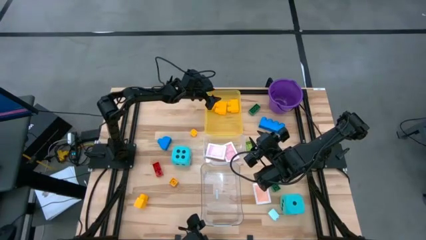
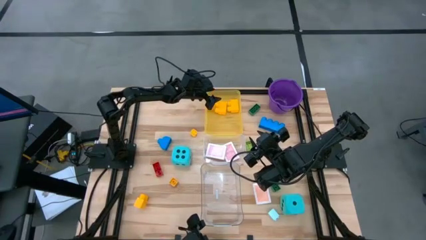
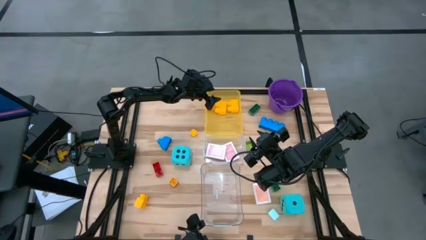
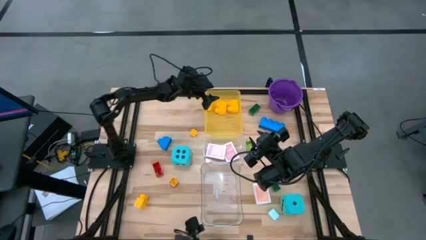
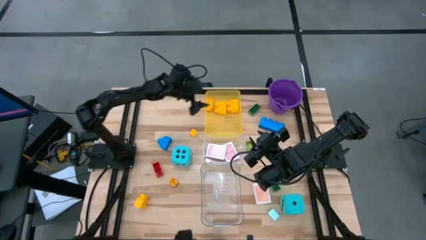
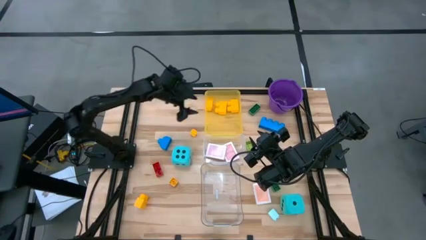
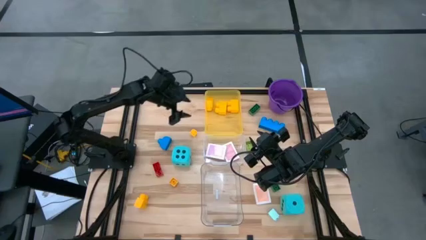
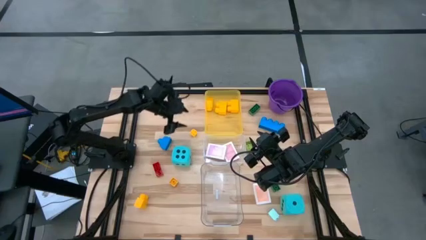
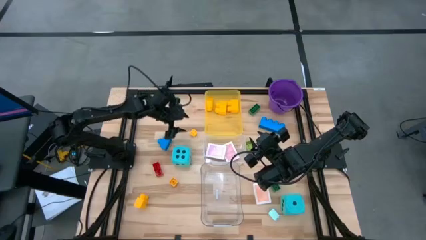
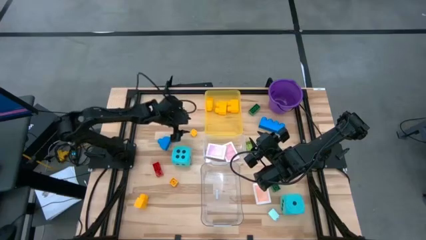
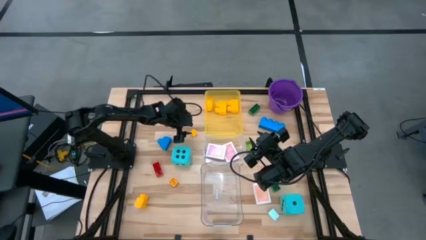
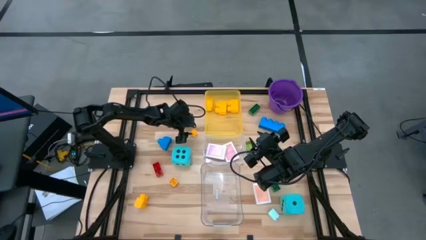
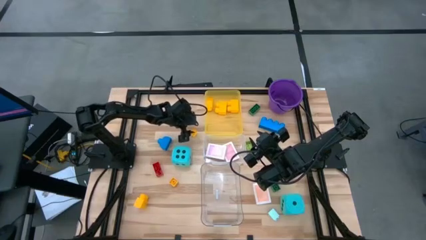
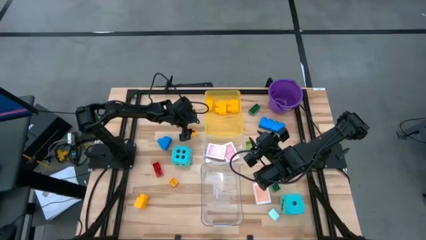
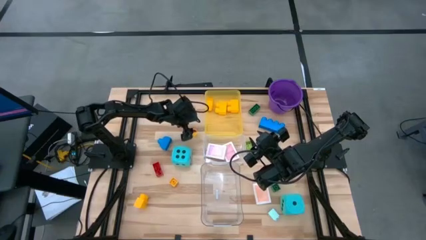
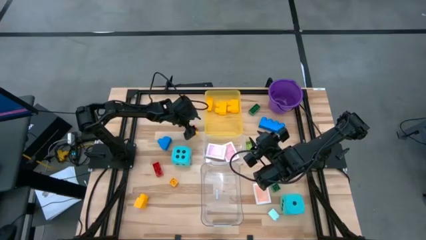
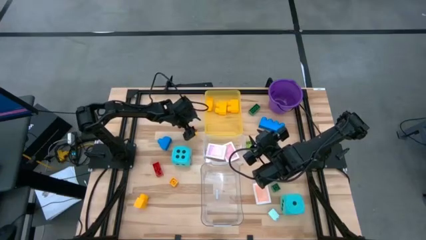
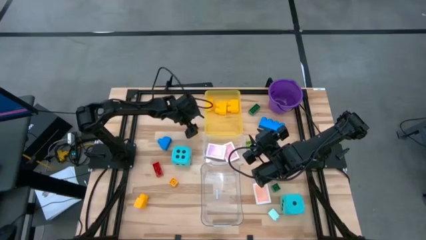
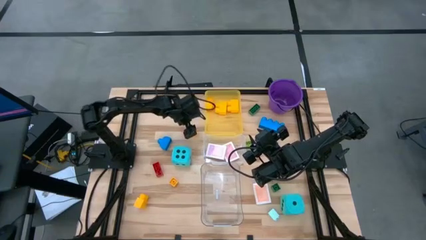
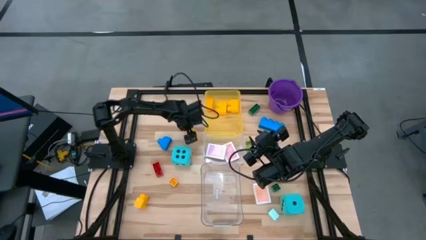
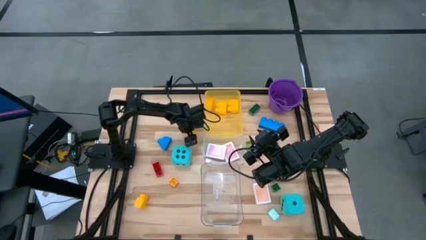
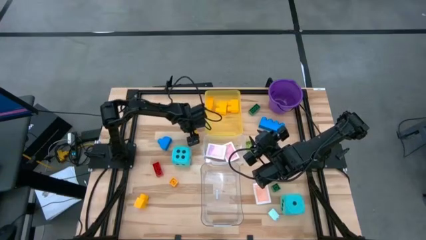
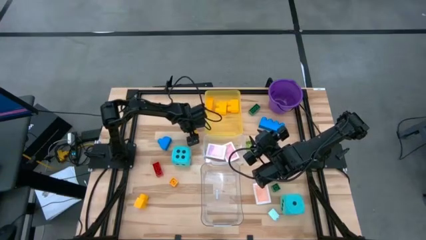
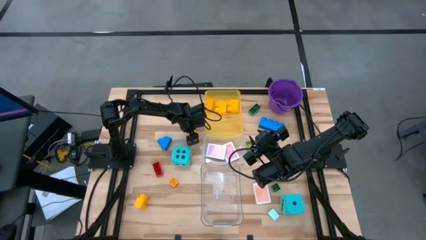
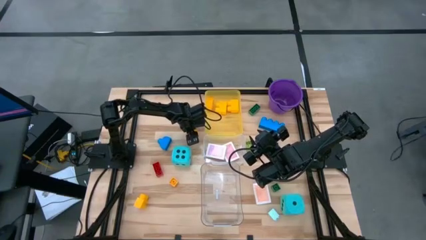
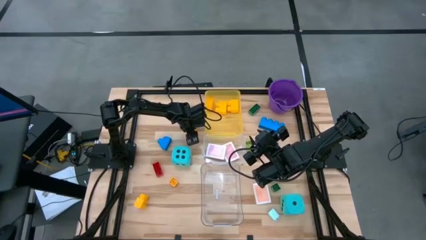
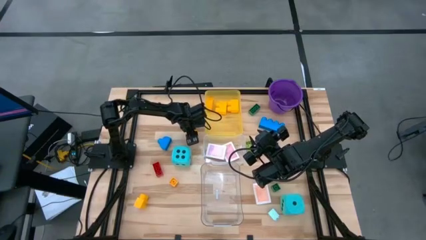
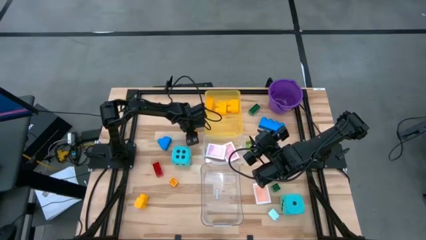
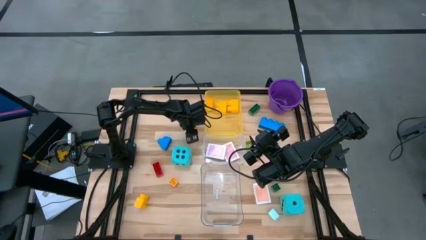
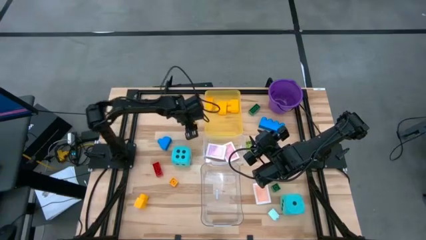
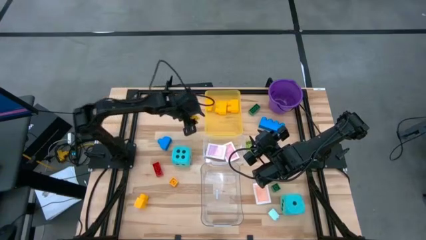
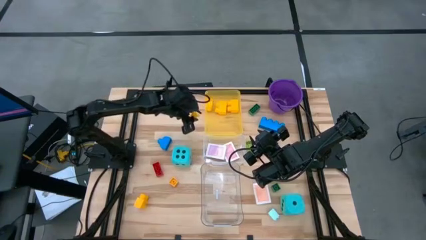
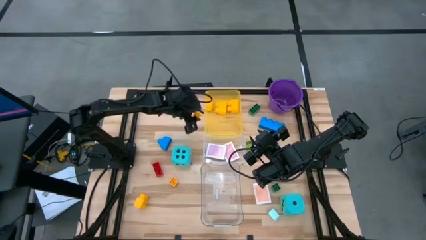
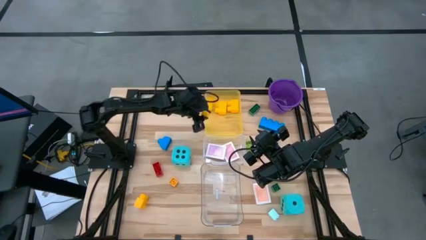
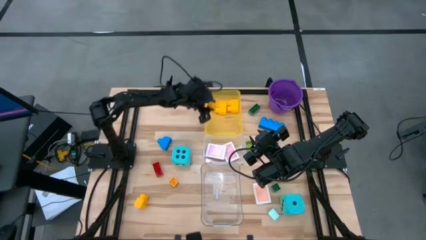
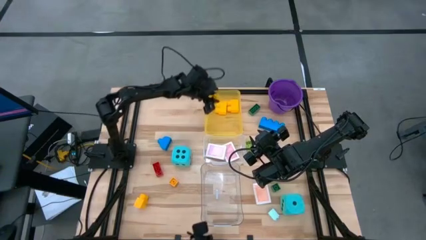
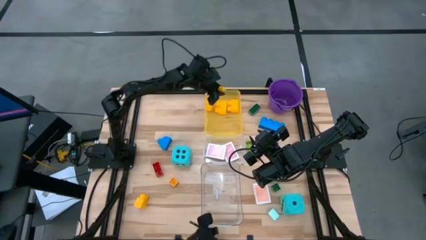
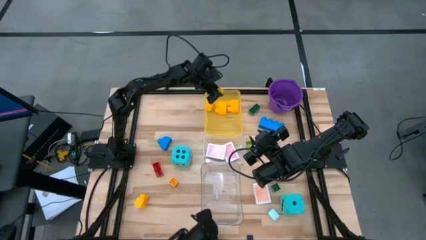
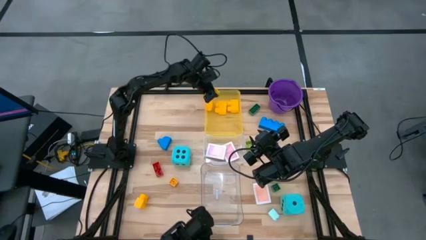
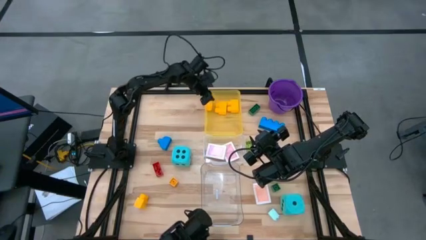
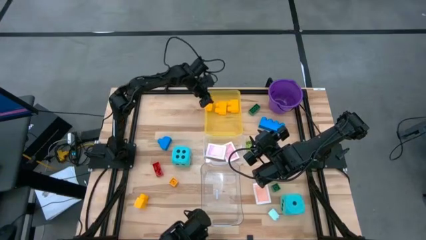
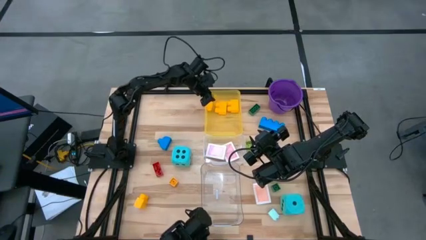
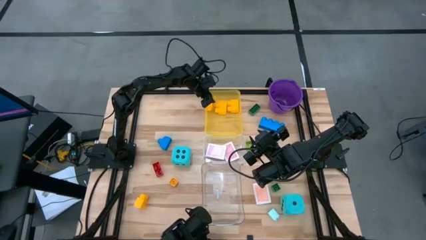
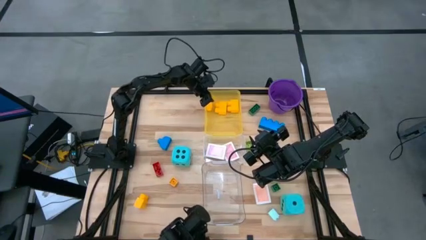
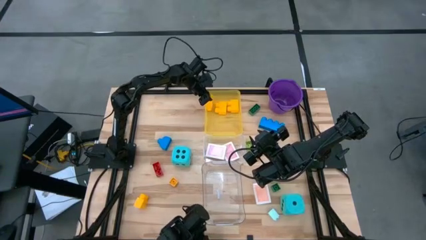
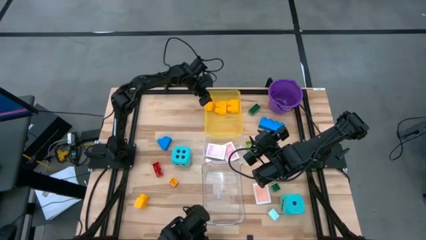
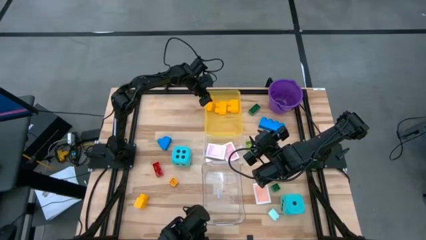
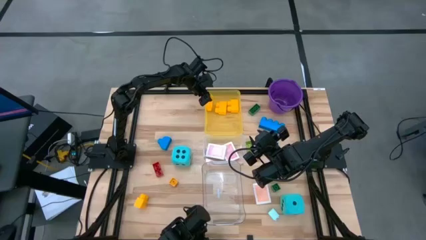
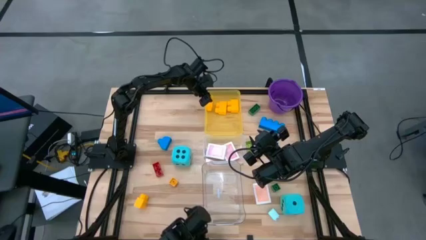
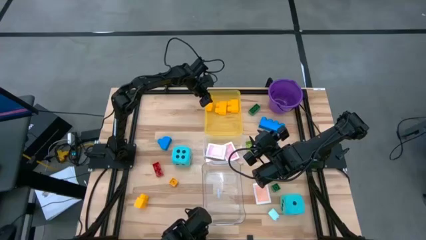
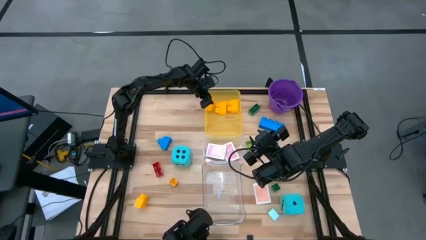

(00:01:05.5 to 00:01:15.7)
Task: Pick & Place Toys
Put the yellow game piece into the yellow bin

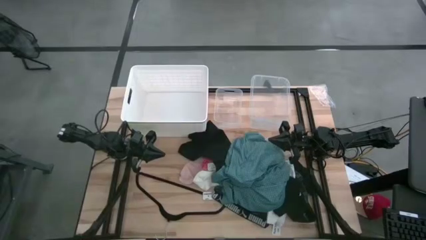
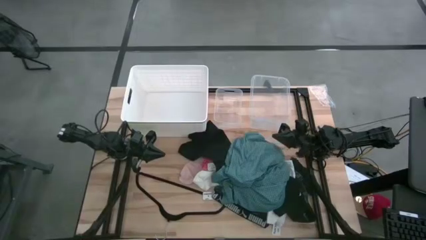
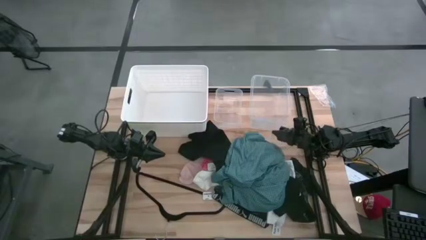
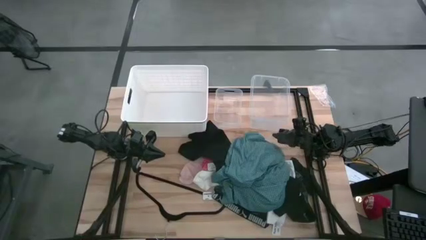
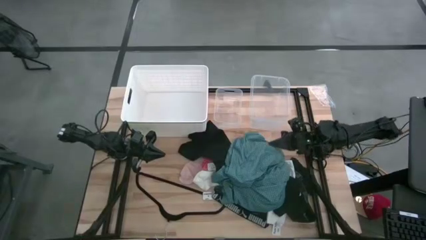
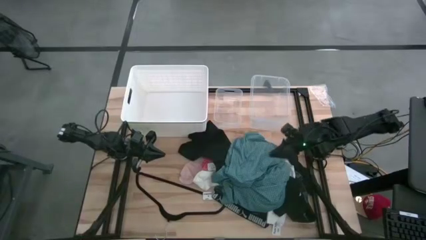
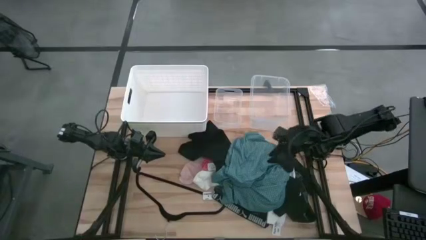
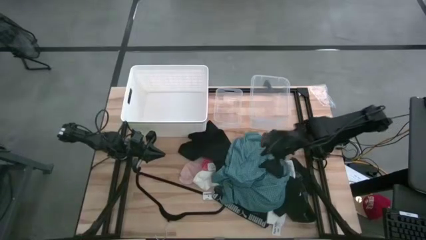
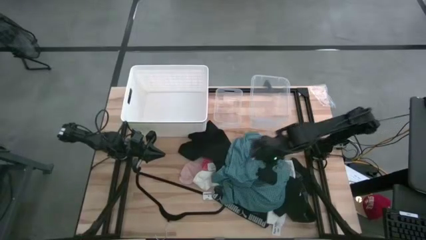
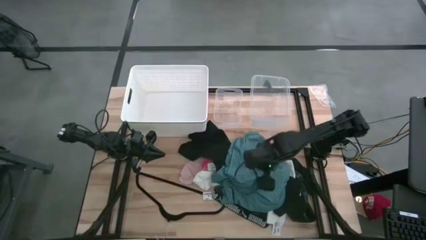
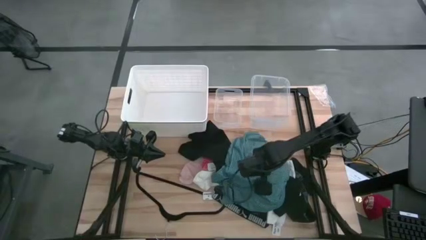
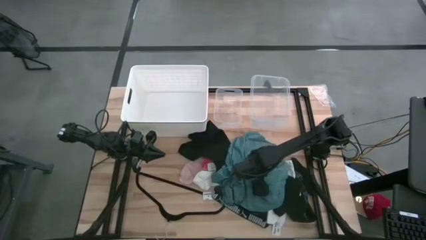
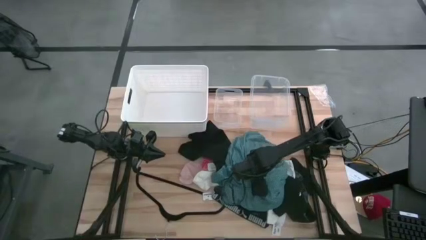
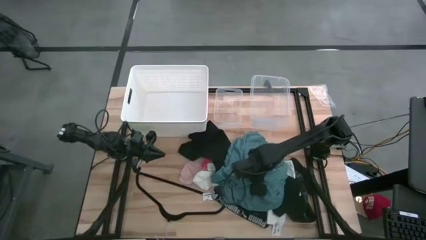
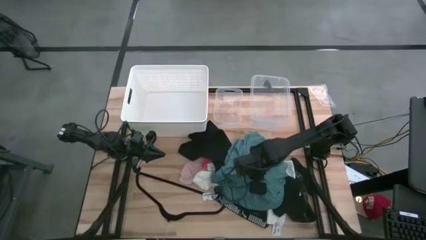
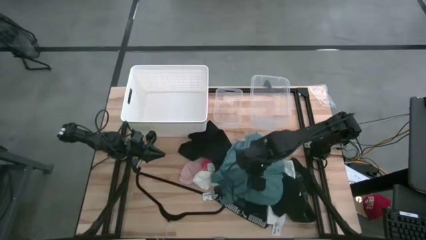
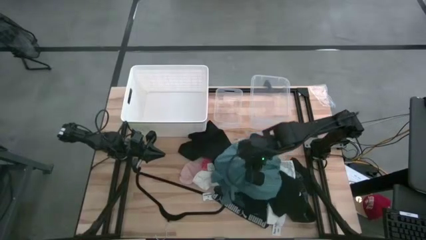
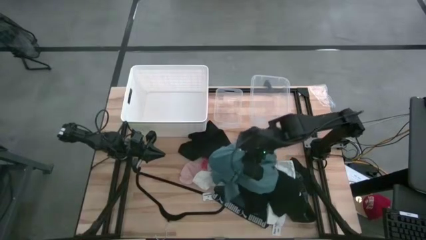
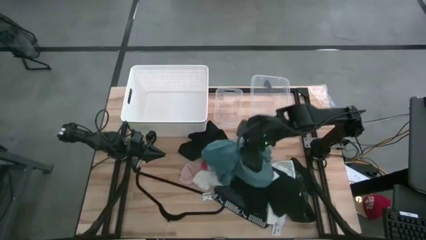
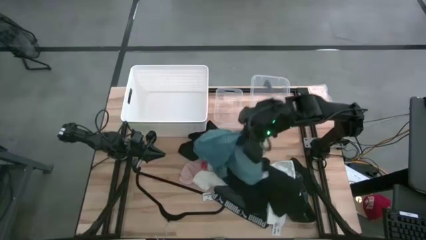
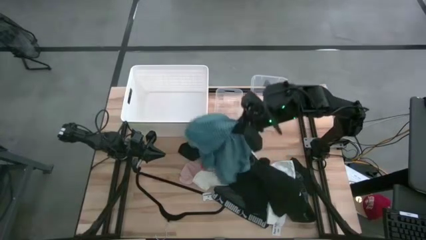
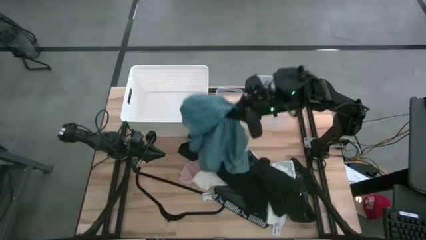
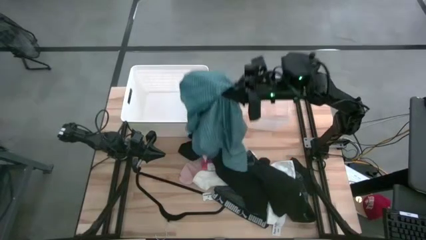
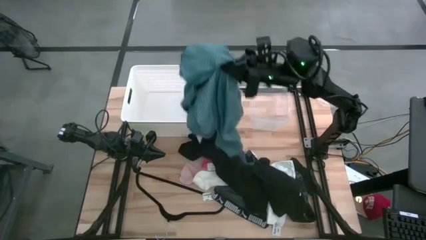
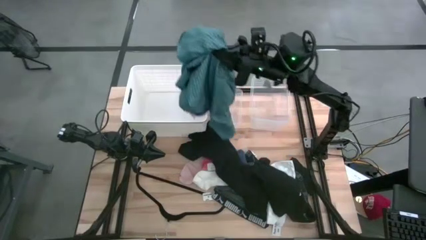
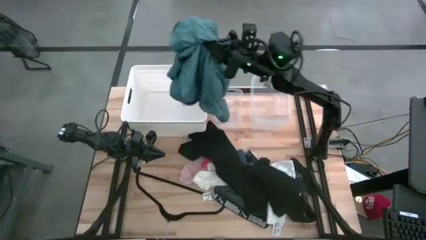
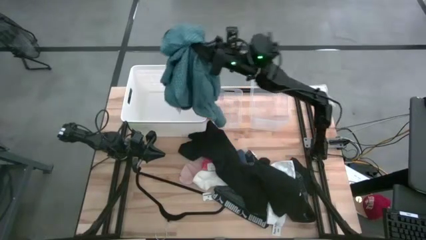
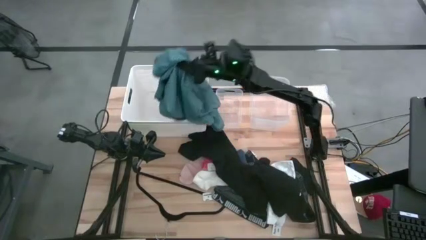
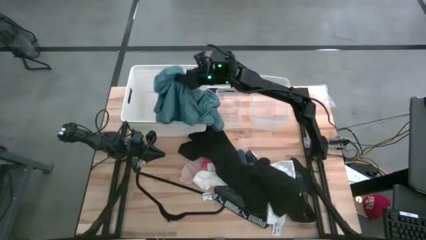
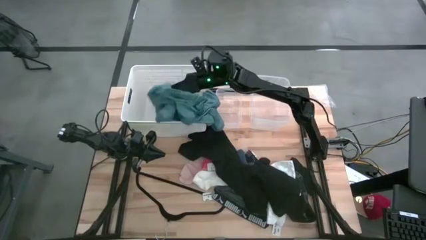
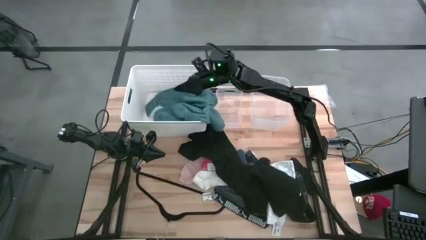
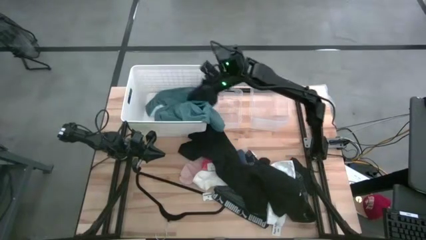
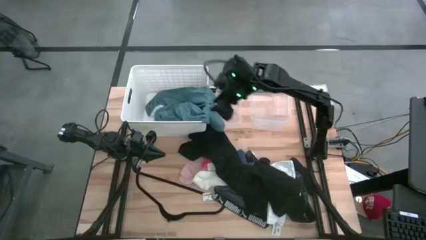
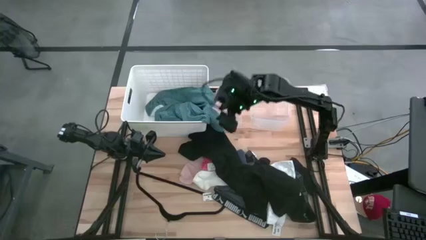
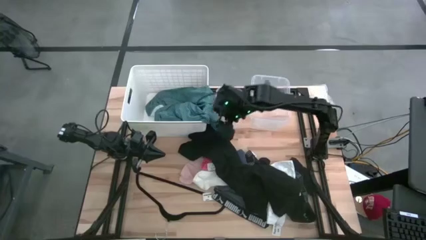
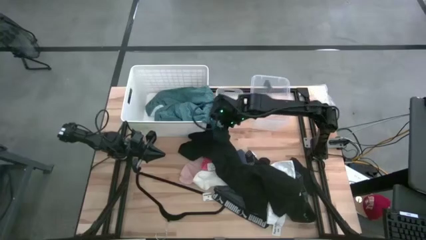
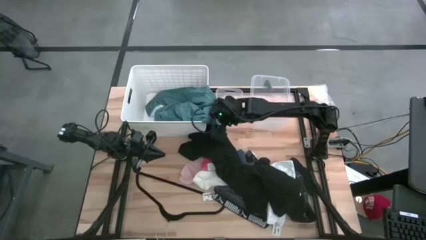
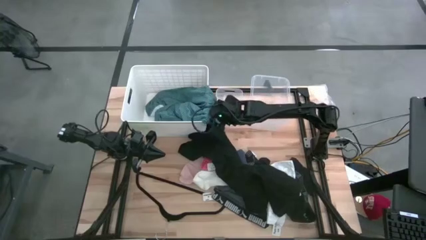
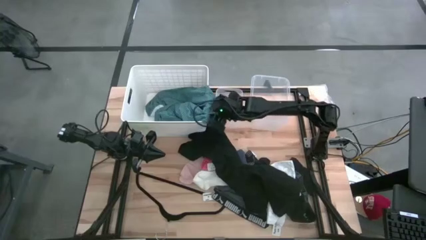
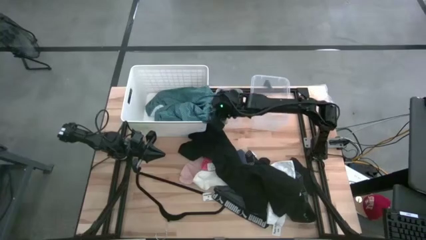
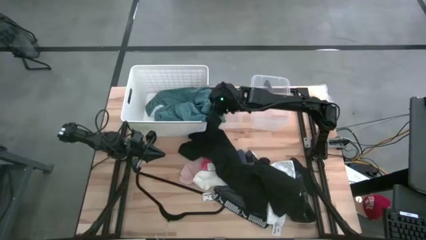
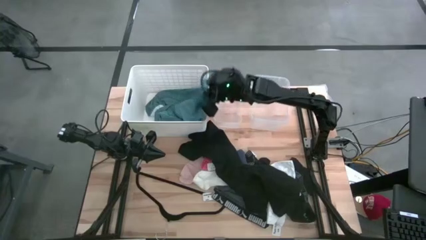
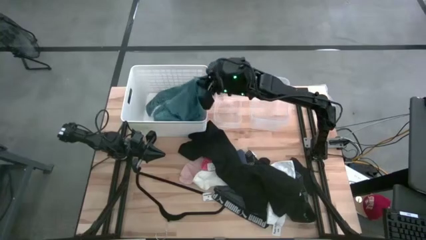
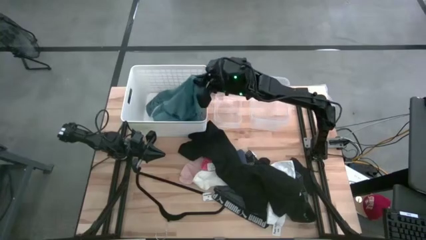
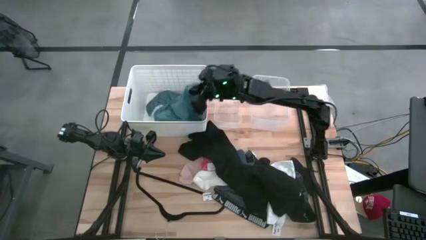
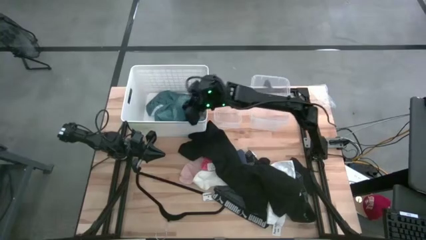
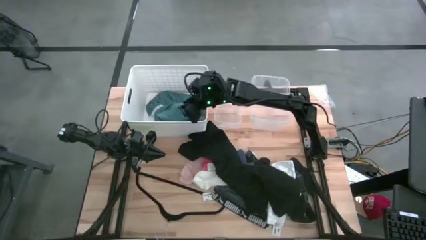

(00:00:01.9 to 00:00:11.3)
Task: Pick & Place Cloths
Put the dark blue polo shirt into the white bin
